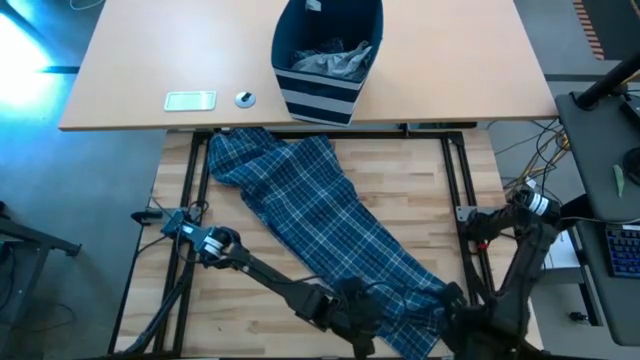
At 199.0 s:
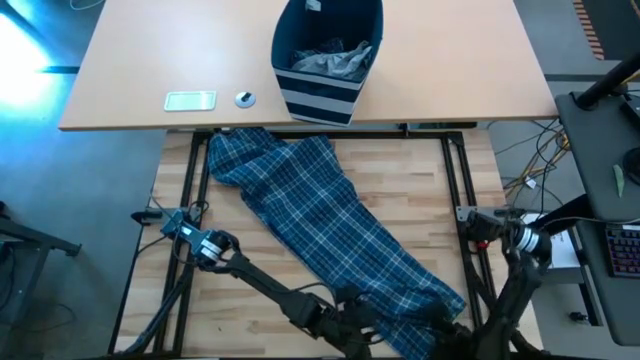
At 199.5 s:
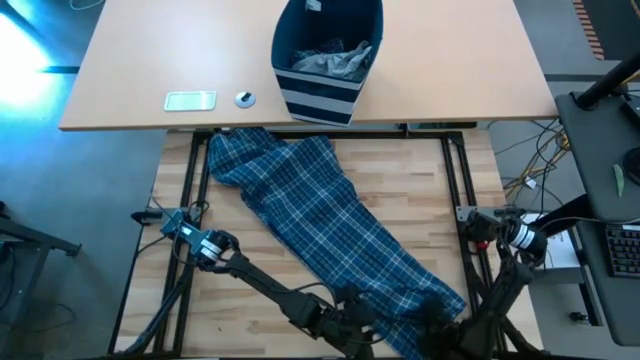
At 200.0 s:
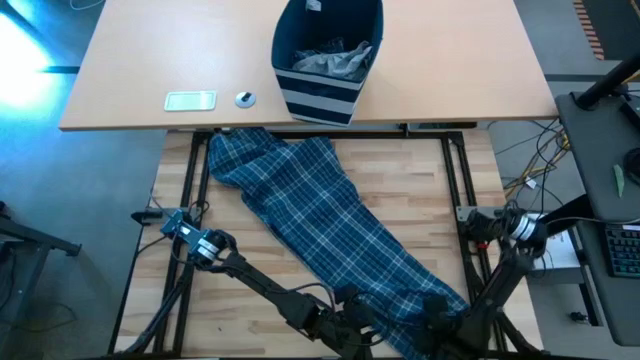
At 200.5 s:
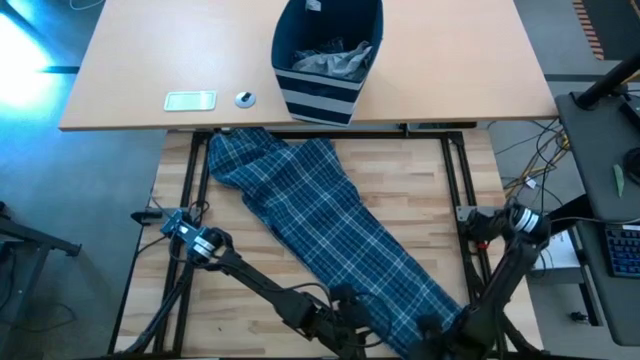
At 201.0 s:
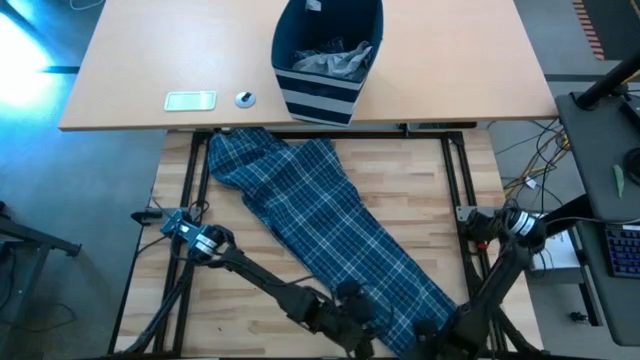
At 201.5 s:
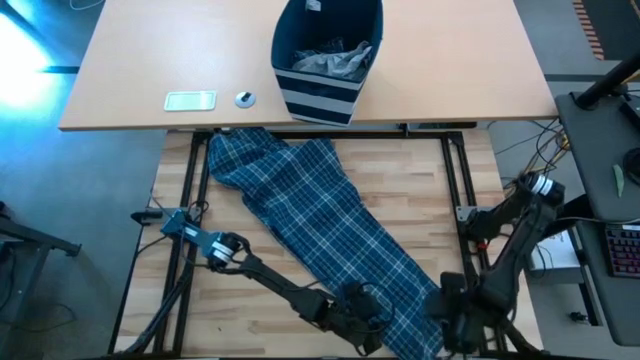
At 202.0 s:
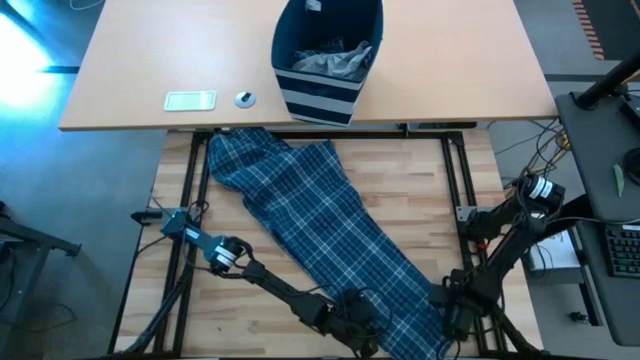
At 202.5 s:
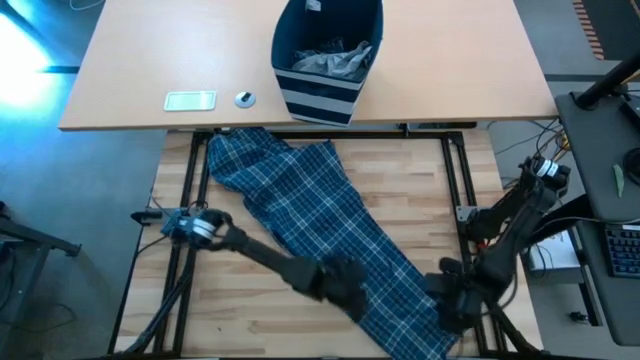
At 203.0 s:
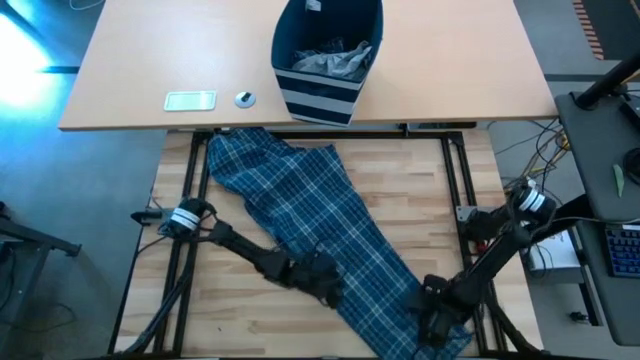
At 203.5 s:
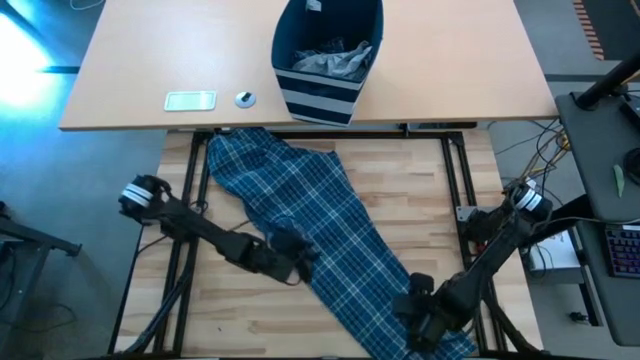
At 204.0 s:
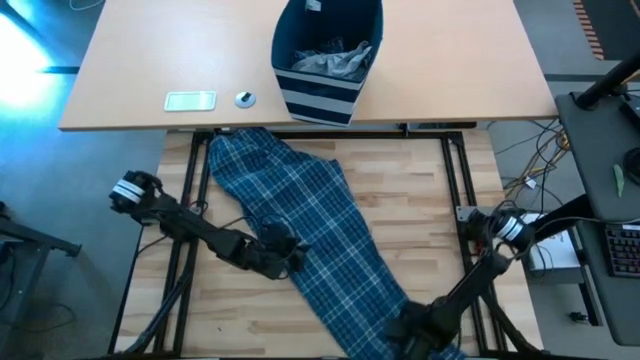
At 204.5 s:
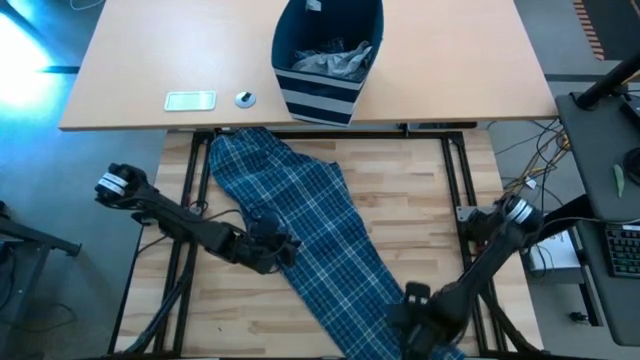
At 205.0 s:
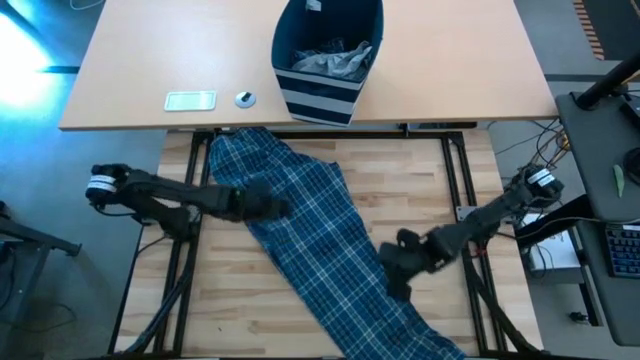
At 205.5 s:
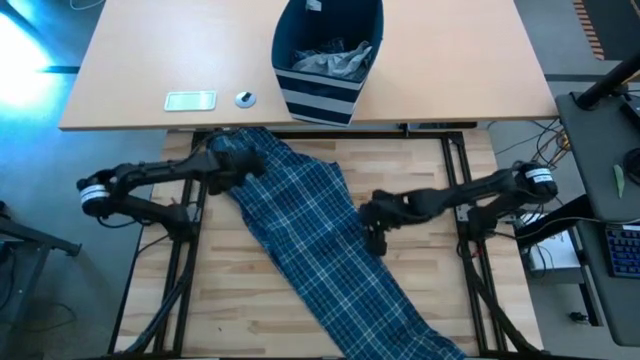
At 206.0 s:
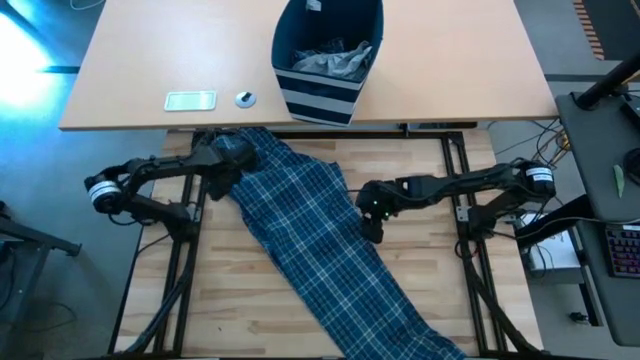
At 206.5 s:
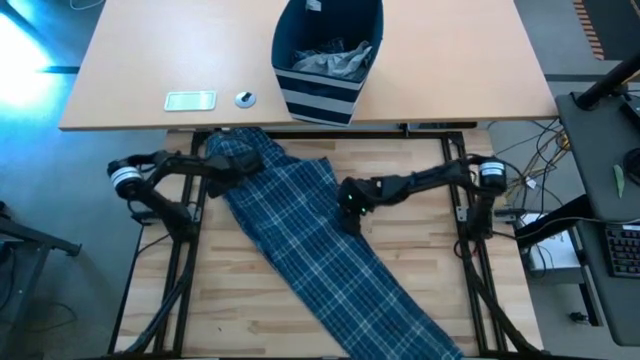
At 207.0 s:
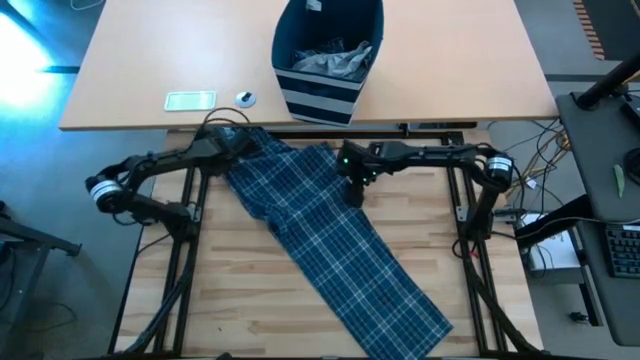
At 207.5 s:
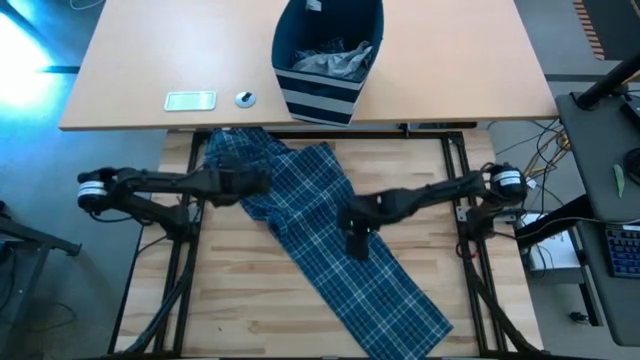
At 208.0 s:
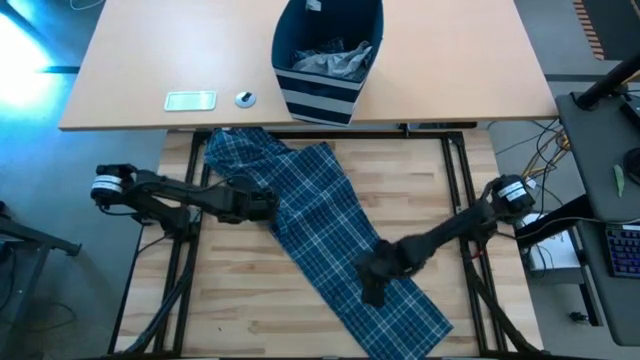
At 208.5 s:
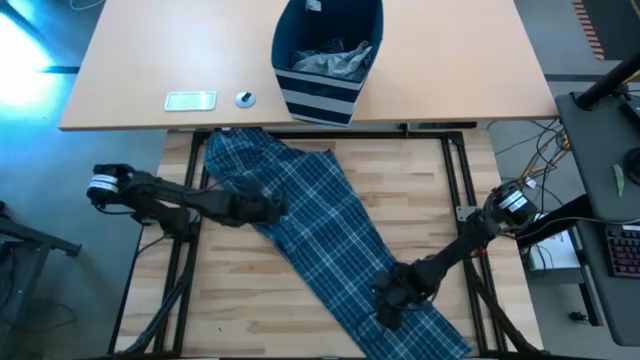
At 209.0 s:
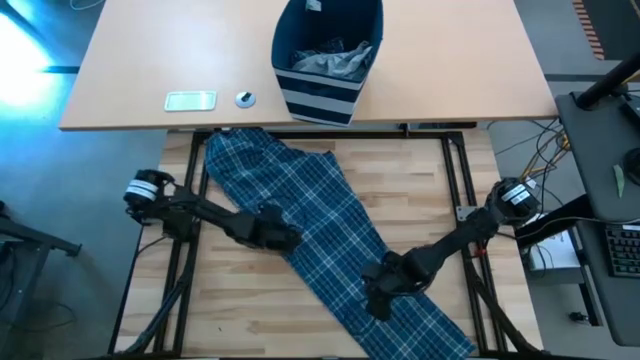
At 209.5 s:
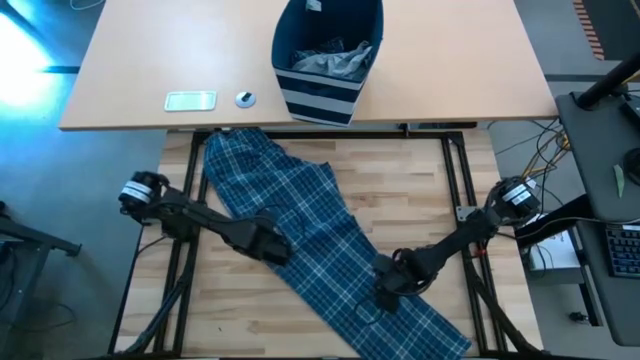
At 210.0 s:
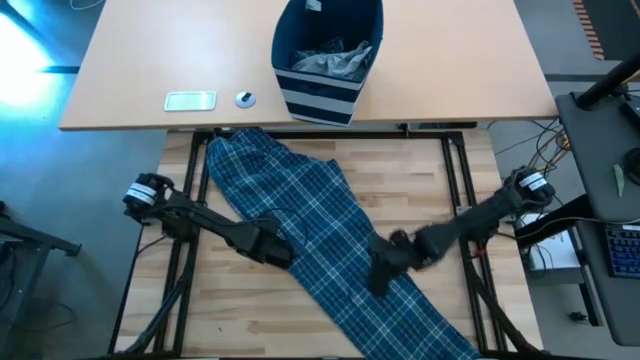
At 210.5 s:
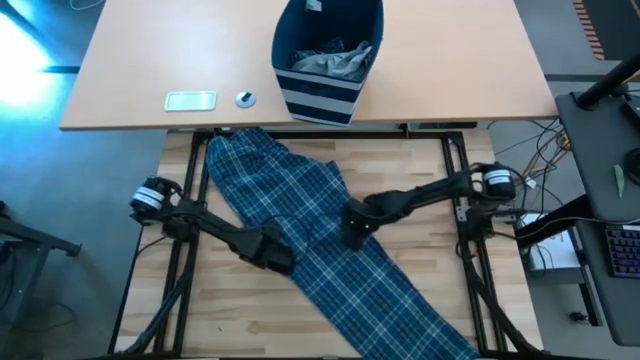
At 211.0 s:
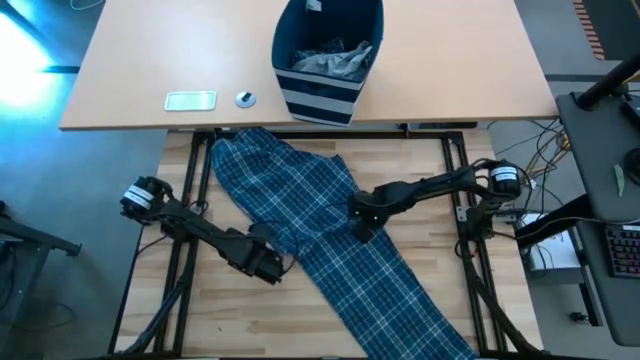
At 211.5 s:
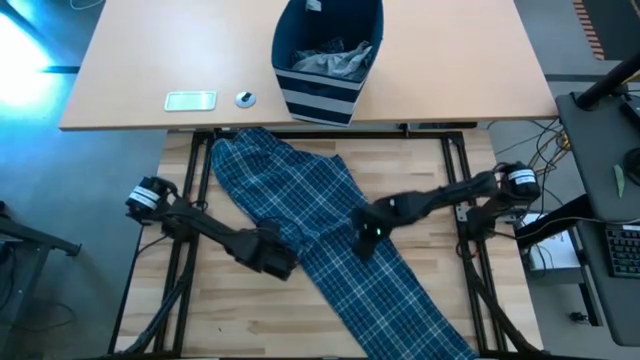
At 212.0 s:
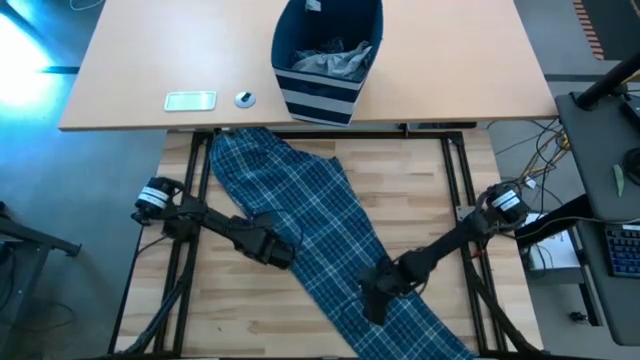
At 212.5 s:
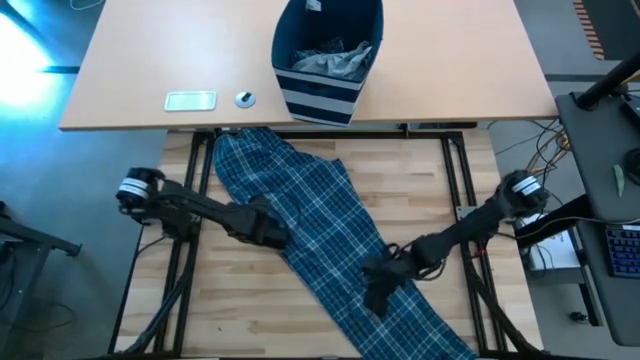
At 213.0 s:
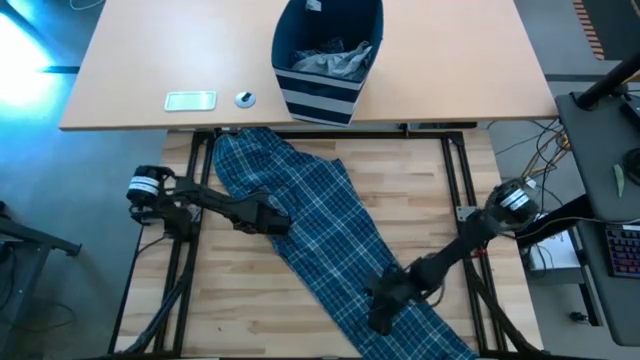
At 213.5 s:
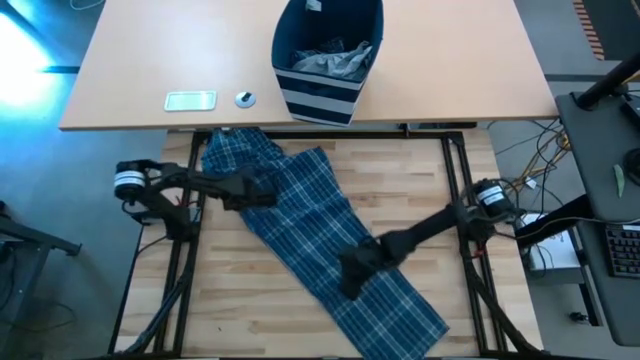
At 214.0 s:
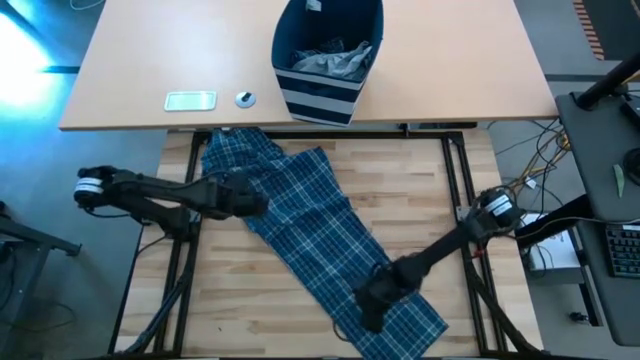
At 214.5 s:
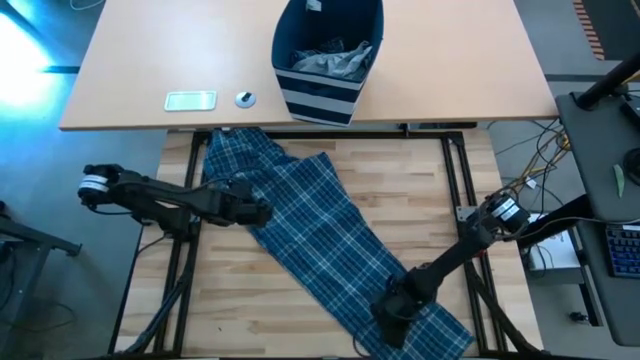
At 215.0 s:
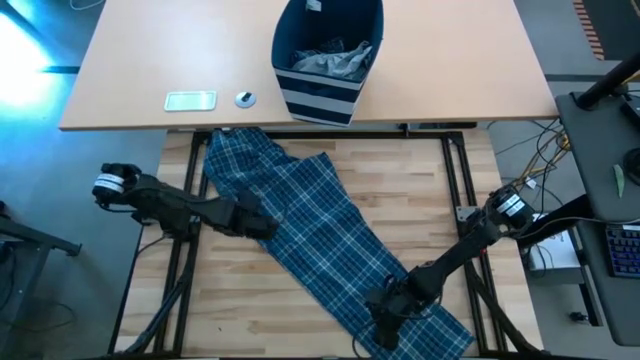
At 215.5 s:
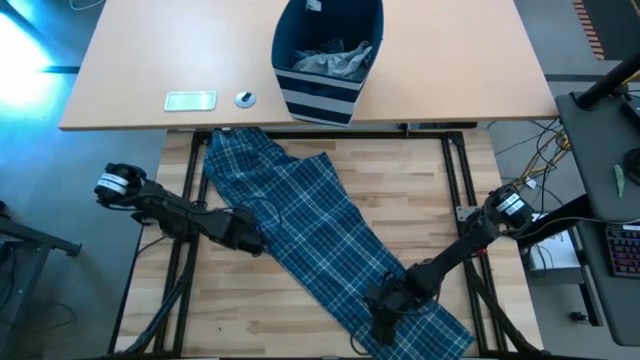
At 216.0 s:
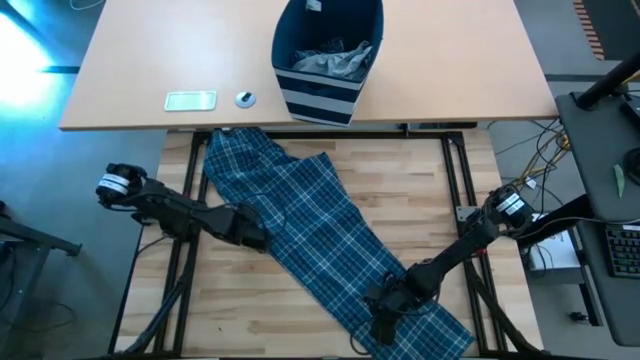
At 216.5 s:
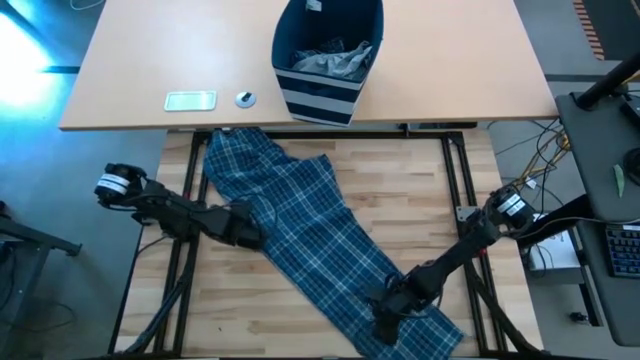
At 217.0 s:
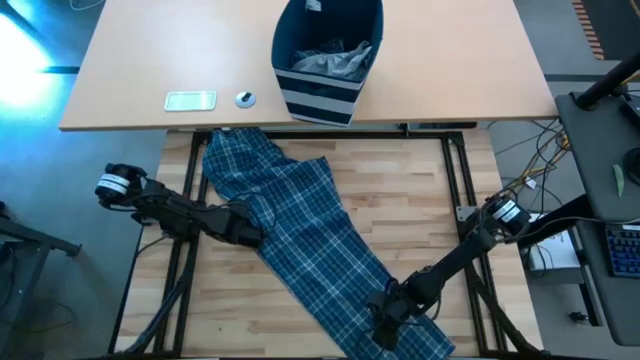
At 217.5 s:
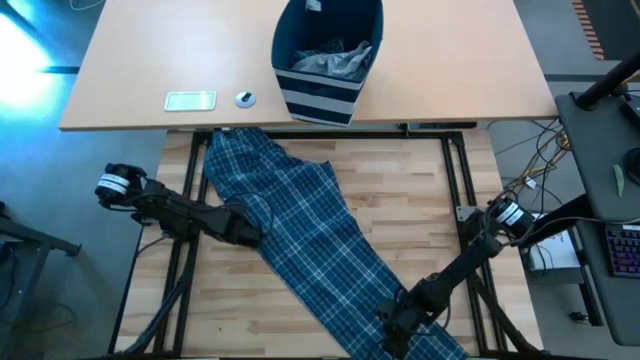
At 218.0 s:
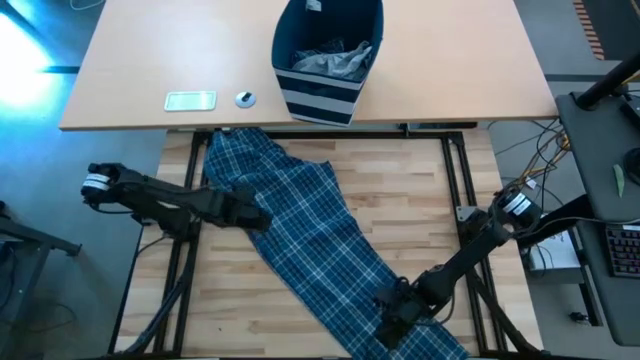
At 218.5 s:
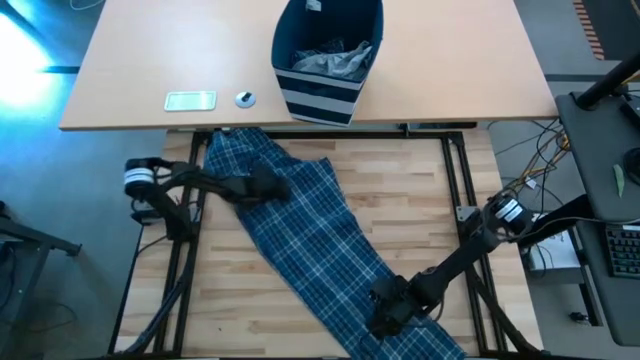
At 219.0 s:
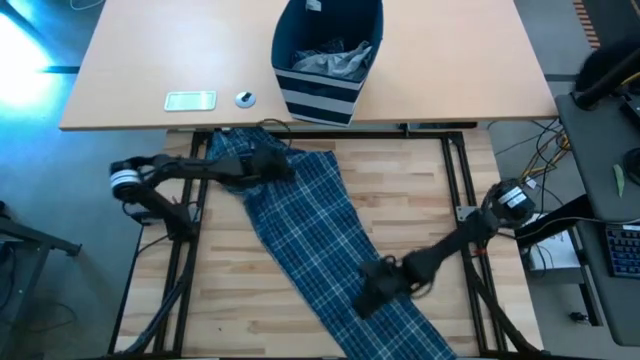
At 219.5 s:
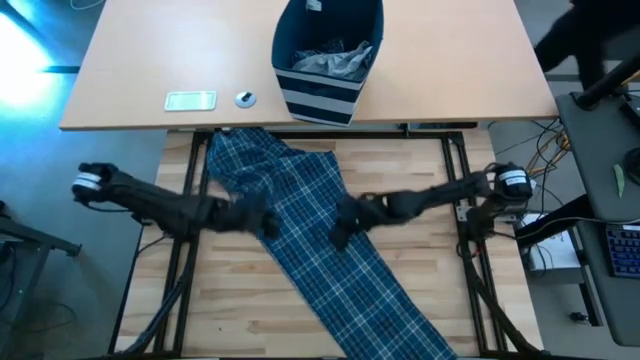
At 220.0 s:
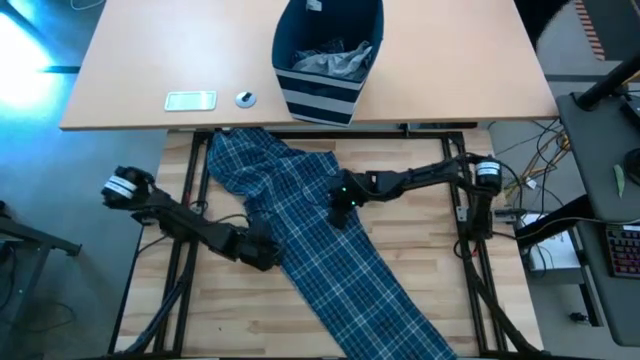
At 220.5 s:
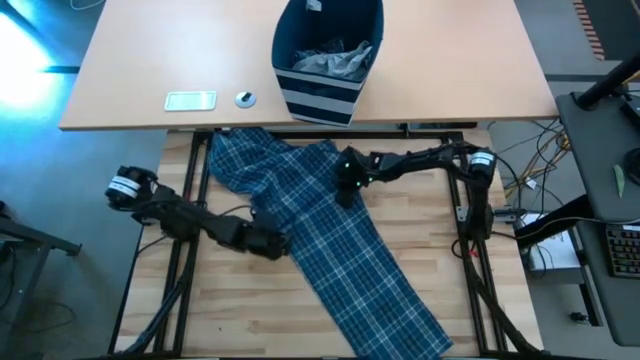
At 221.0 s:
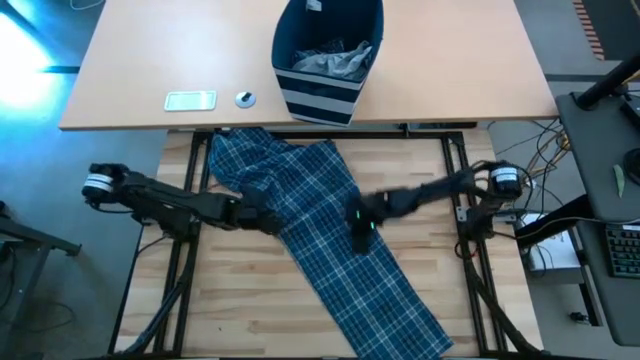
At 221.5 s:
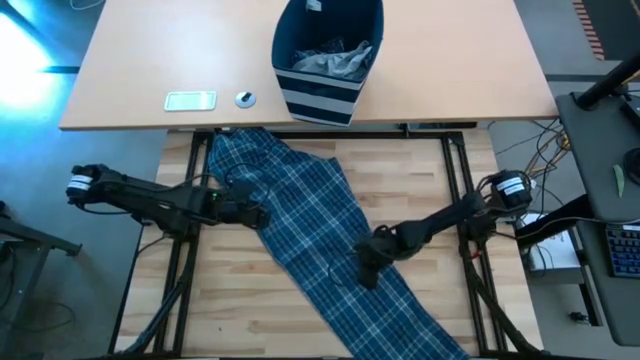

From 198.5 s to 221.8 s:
Task: Fold Laundry from Bin
Fold the blue patterned pants
